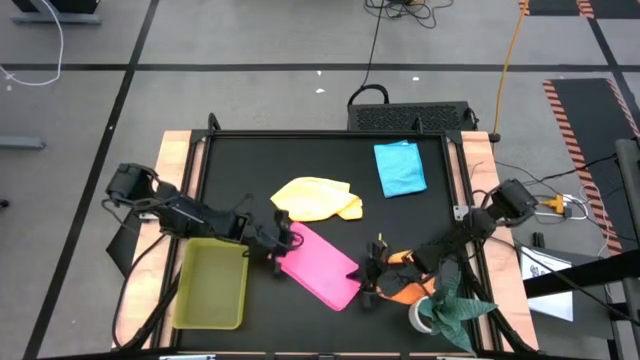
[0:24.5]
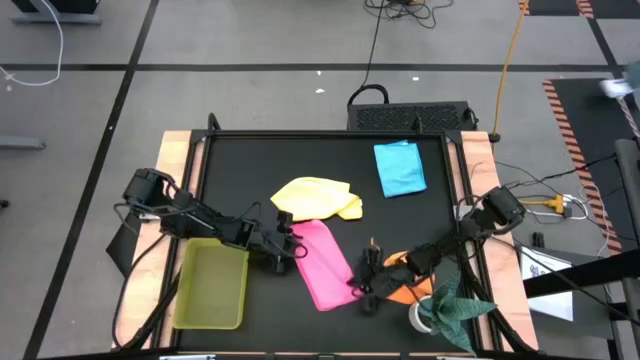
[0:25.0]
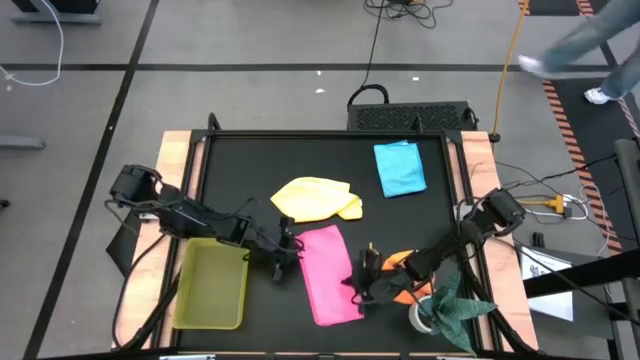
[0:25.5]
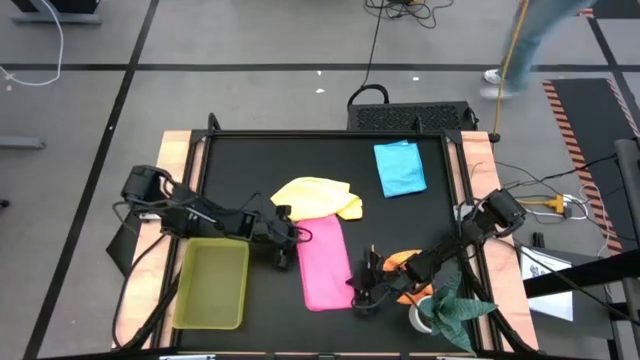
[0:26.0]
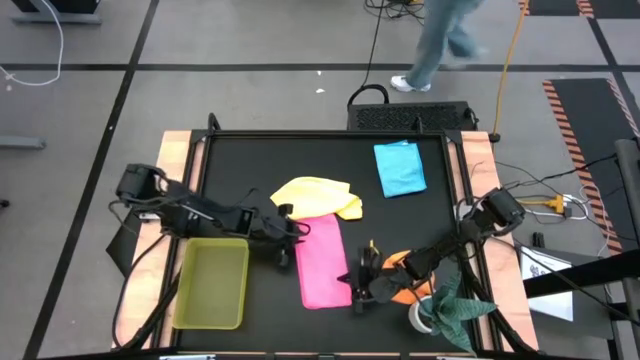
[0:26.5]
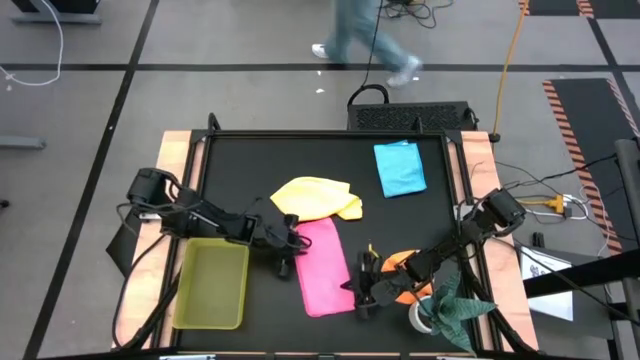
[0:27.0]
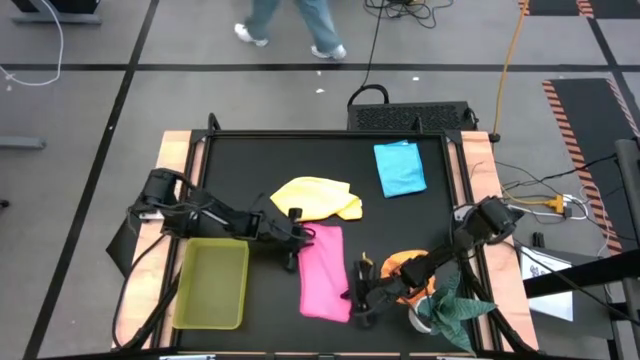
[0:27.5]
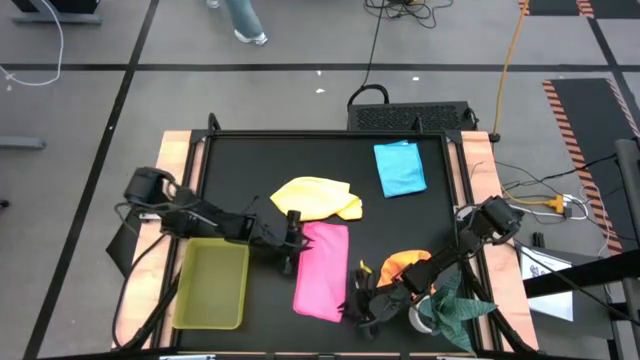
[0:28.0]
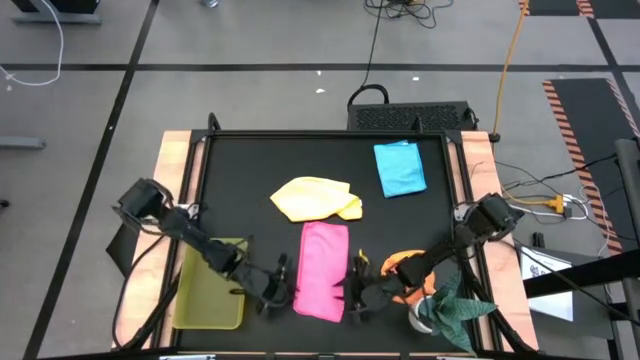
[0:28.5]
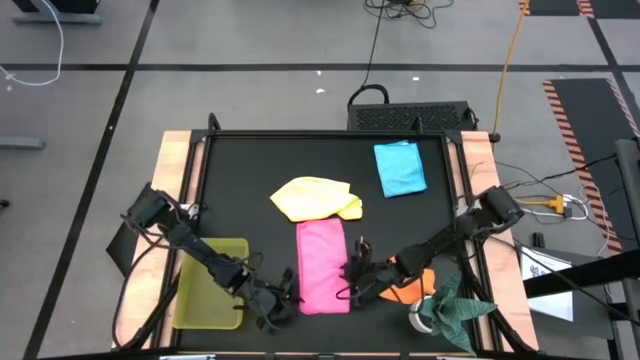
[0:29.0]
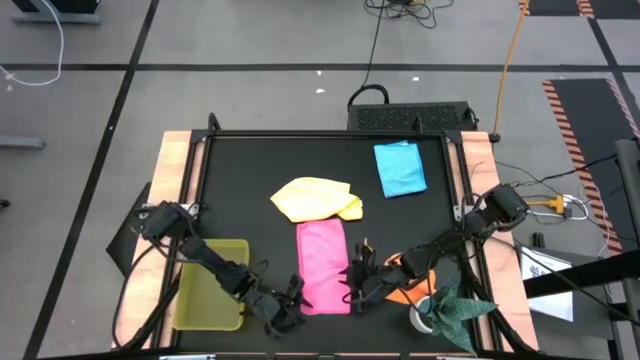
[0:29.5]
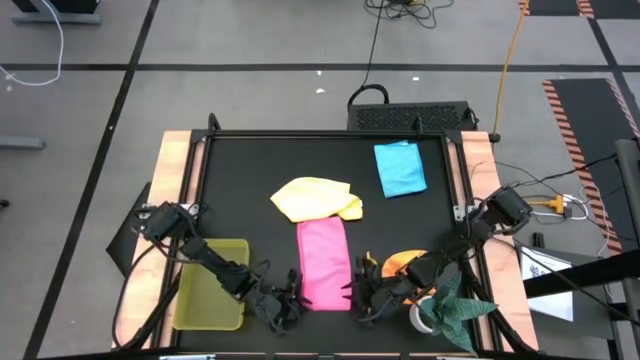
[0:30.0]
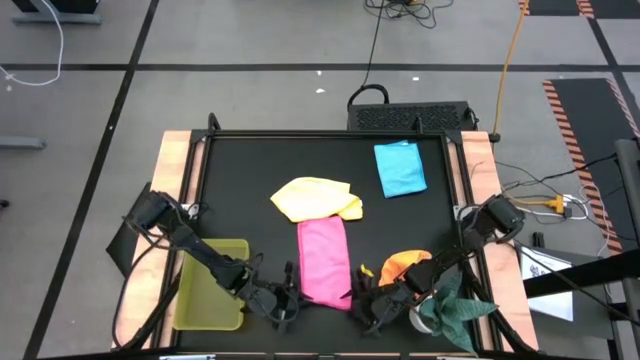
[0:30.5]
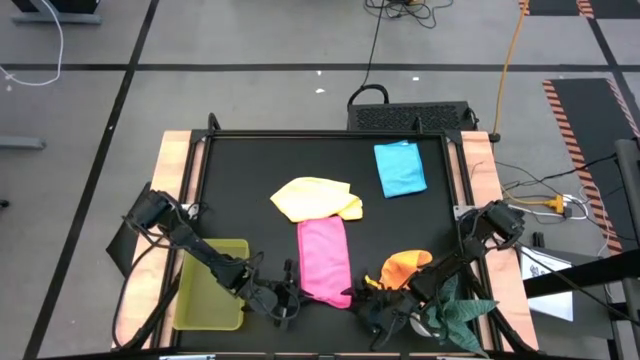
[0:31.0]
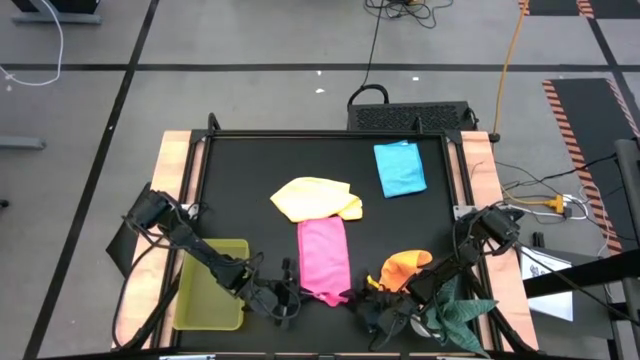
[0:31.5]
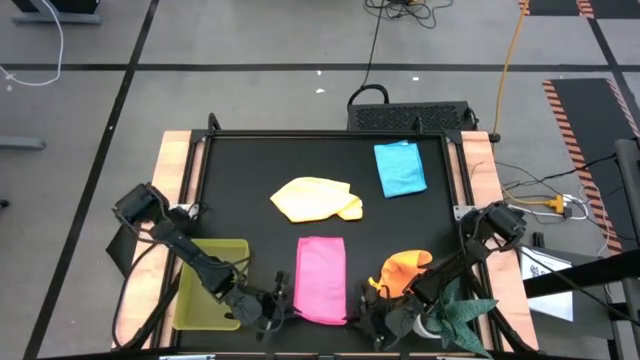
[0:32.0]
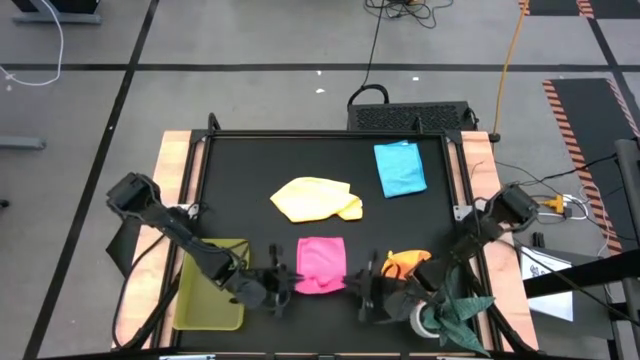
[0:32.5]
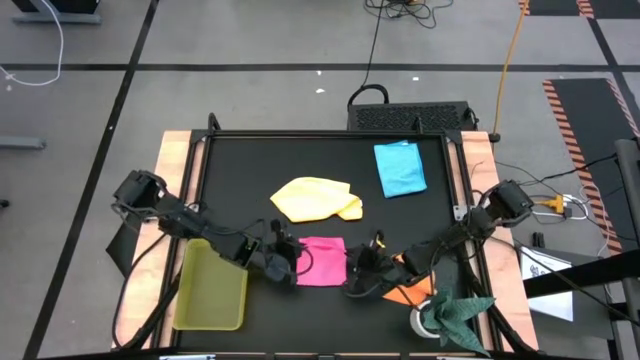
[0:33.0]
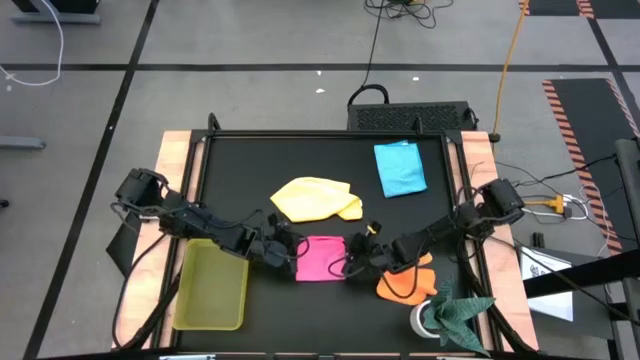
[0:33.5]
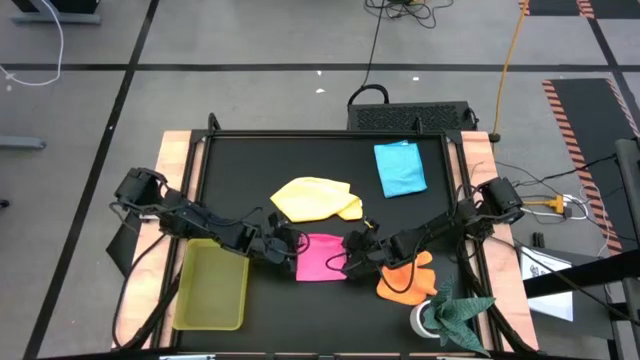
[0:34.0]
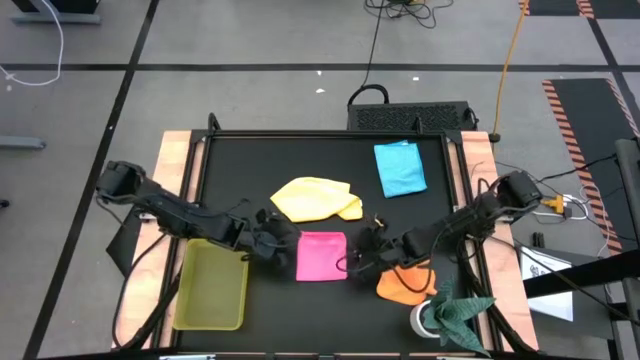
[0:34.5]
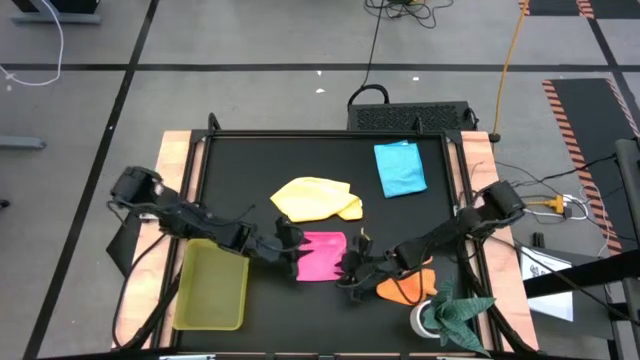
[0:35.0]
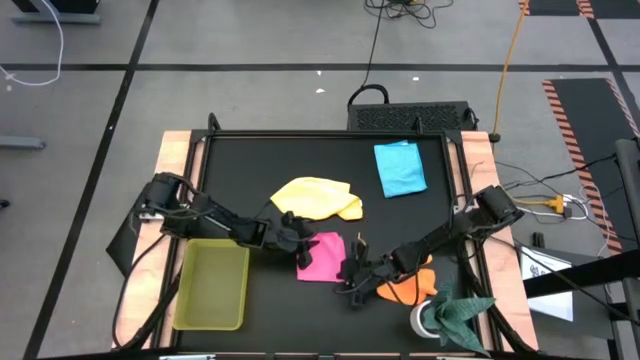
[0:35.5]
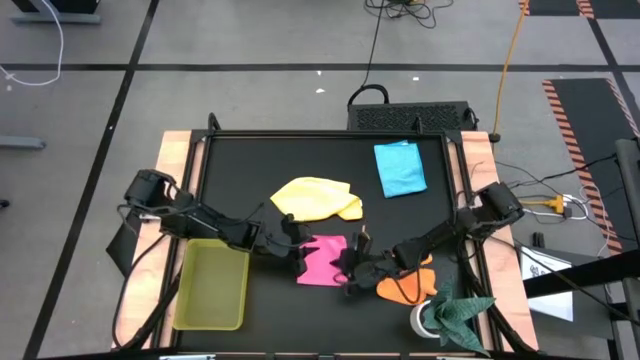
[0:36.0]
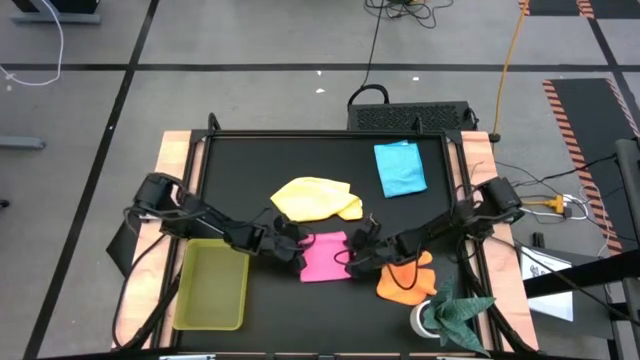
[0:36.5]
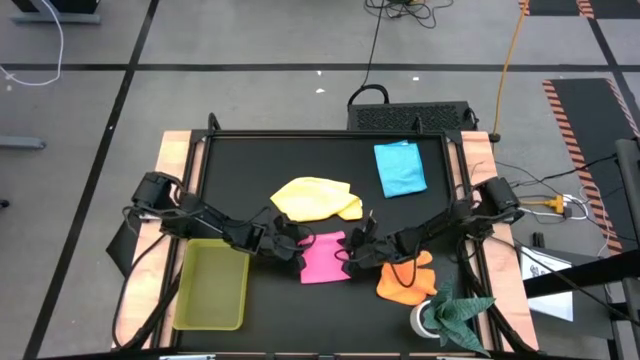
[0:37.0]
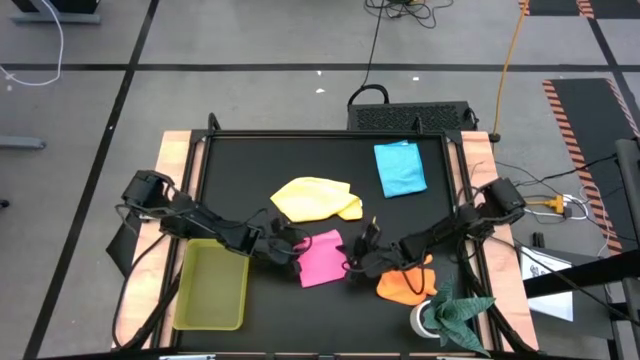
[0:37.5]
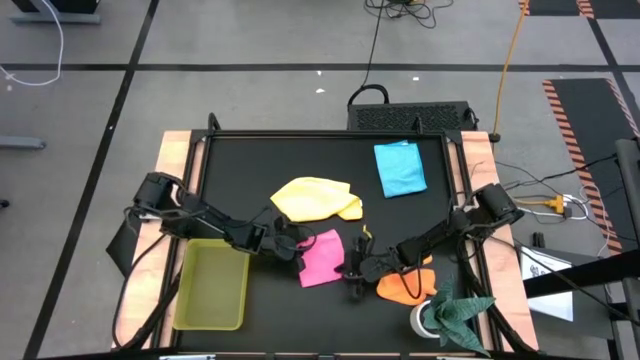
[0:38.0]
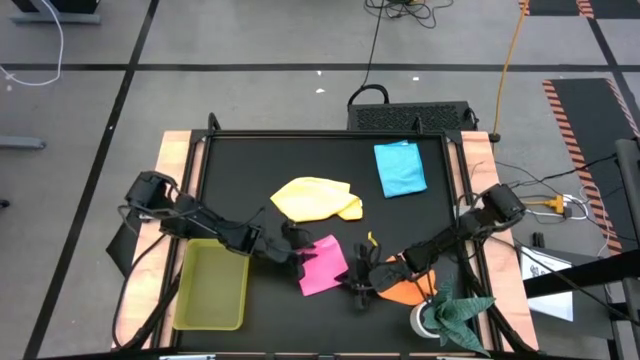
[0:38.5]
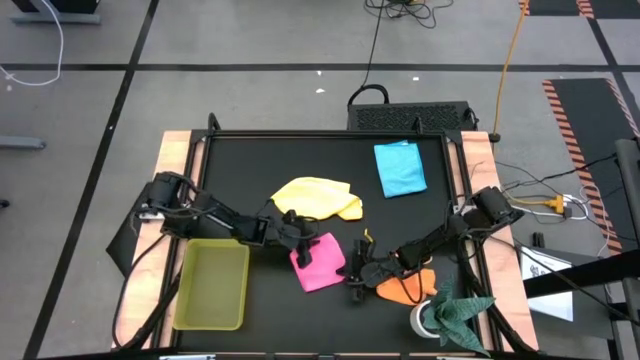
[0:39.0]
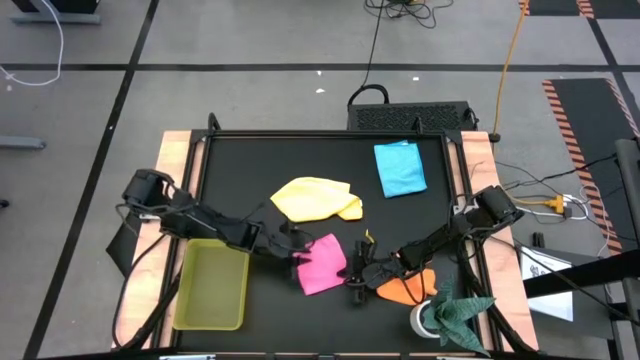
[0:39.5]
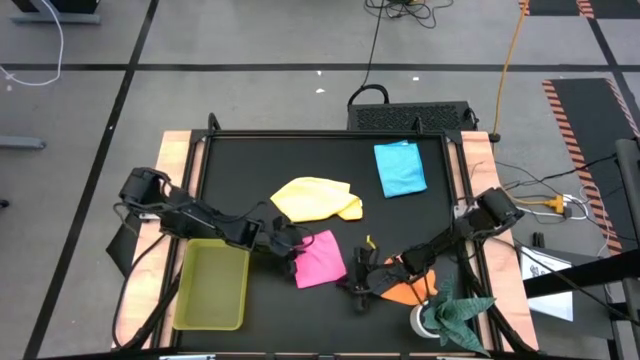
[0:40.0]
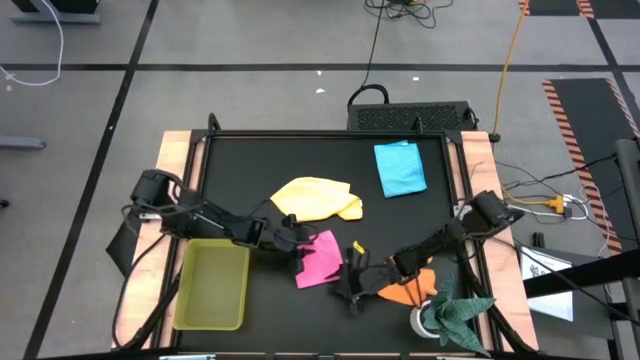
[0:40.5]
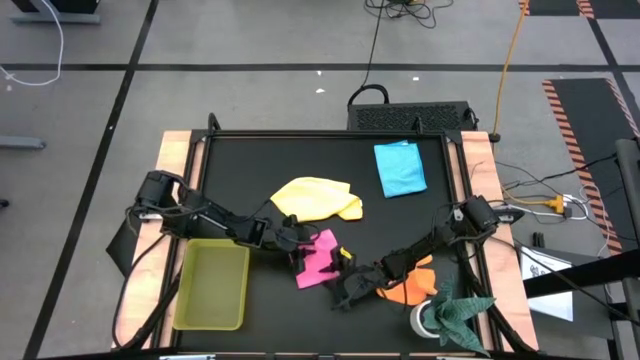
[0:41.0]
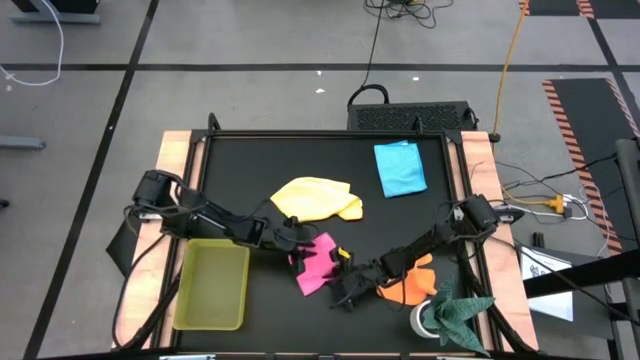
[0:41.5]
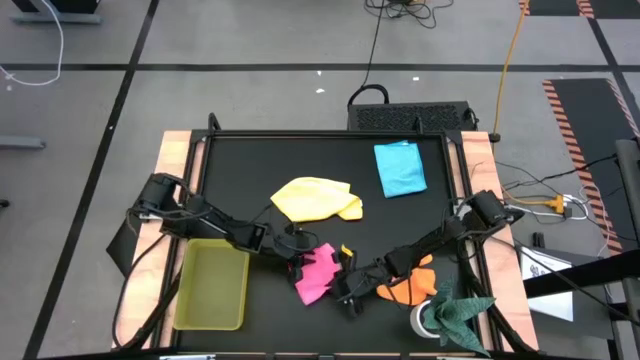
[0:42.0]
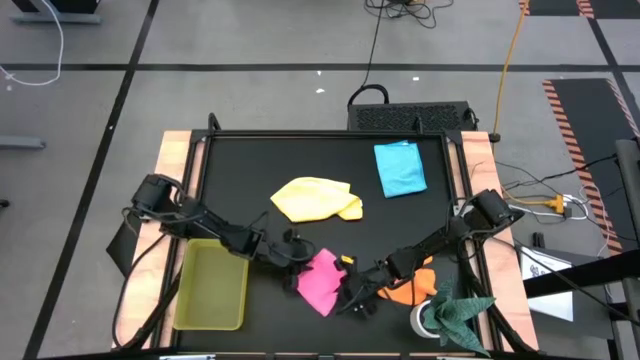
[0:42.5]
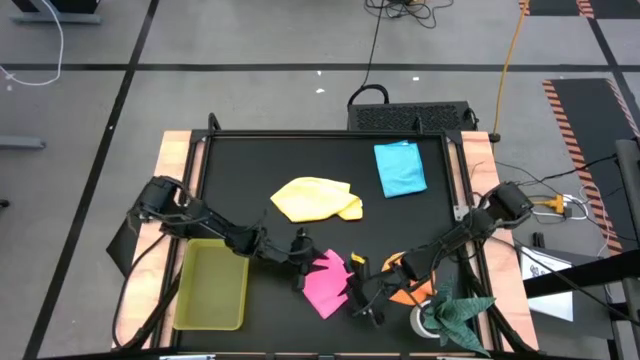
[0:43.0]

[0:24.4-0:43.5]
Task: Fold microfiber towels
Fold the pink microfiber towel

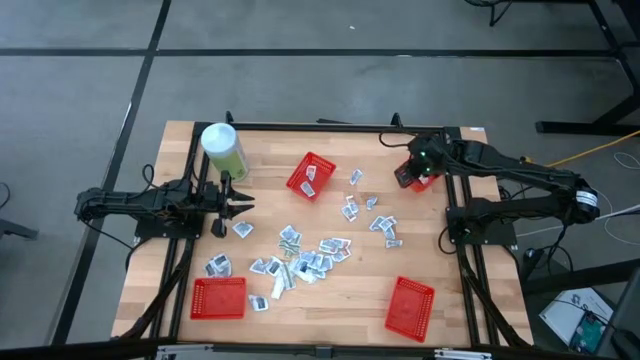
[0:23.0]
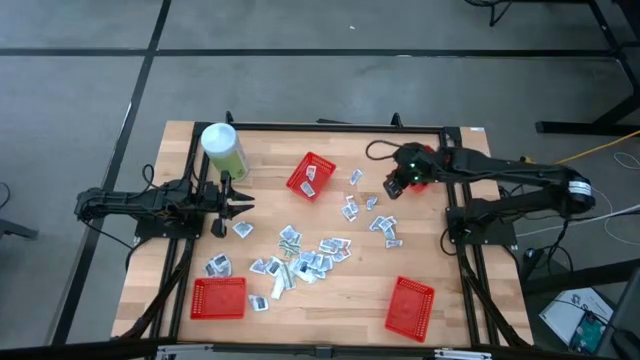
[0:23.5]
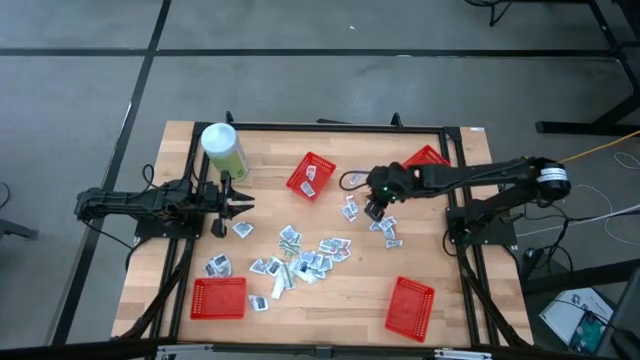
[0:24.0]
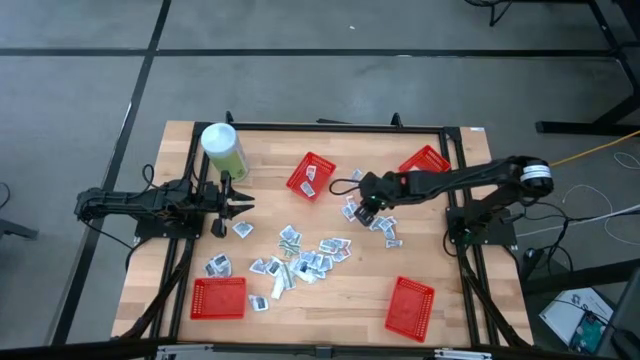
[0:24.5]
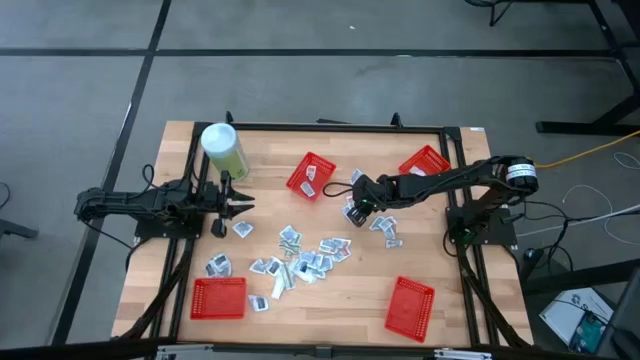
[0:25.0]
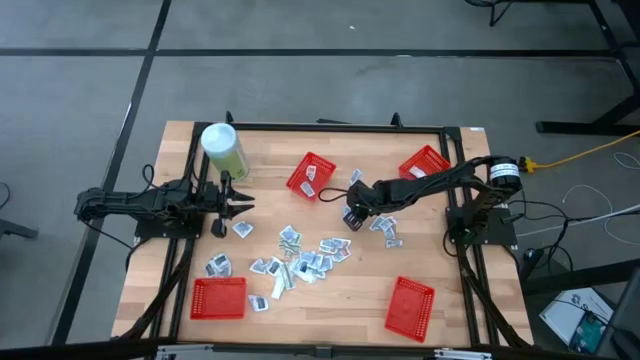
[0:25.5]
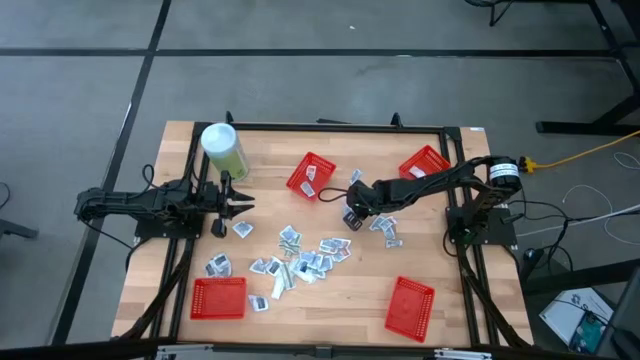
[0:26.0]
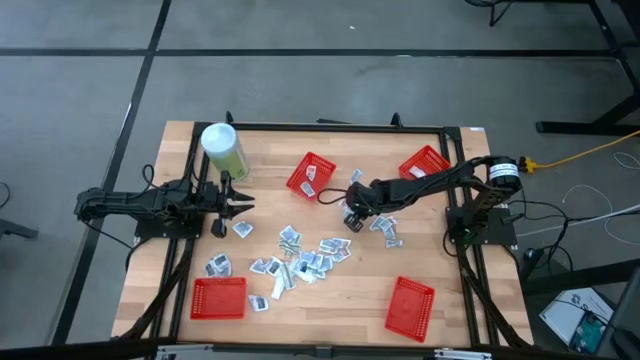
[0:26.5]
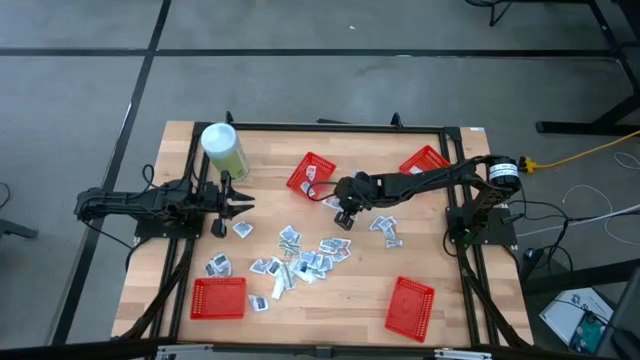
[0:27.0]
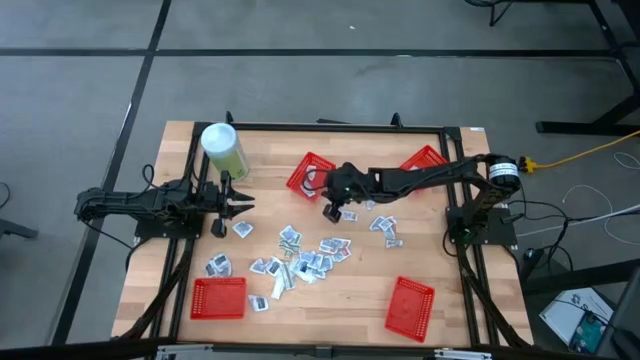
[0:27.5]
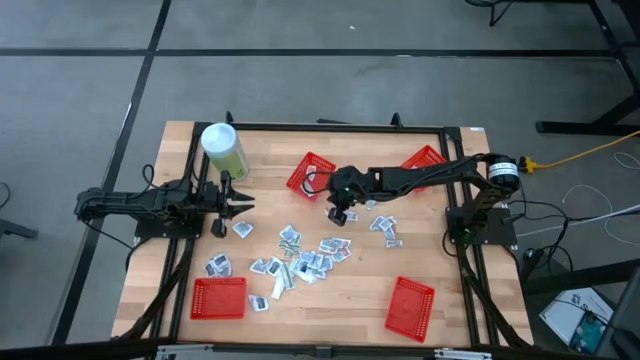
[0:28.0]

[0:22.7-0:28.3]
Task: Pick & Place First Aid Supplies
Put the orange ointment pack into the red container
